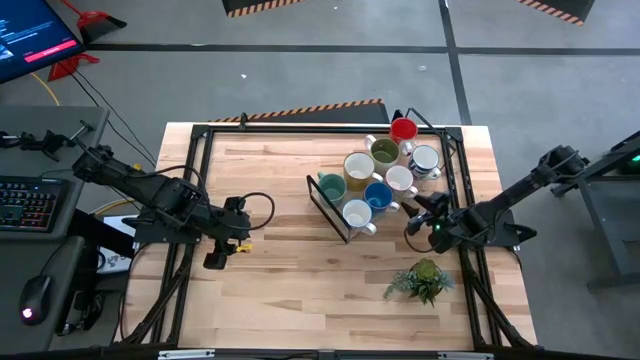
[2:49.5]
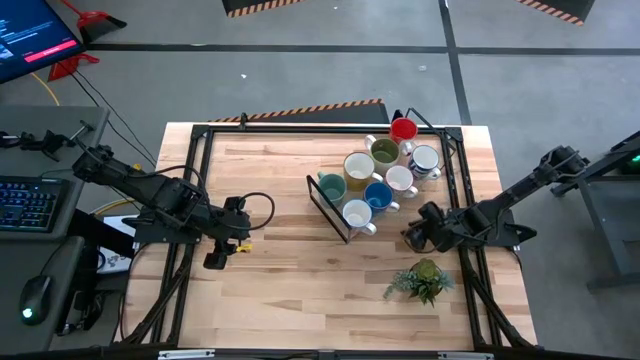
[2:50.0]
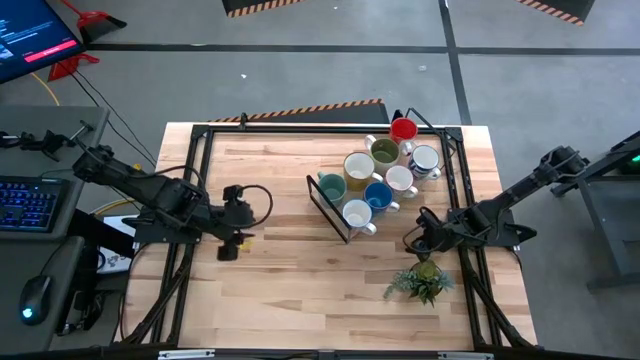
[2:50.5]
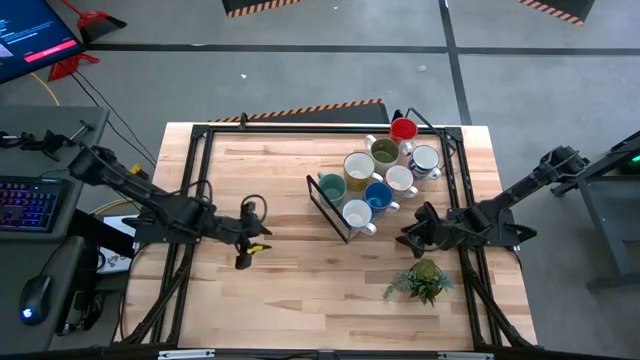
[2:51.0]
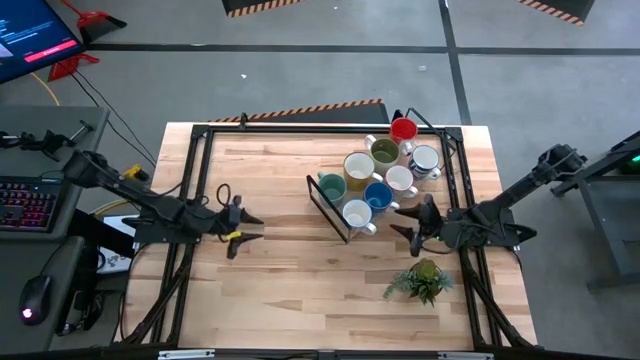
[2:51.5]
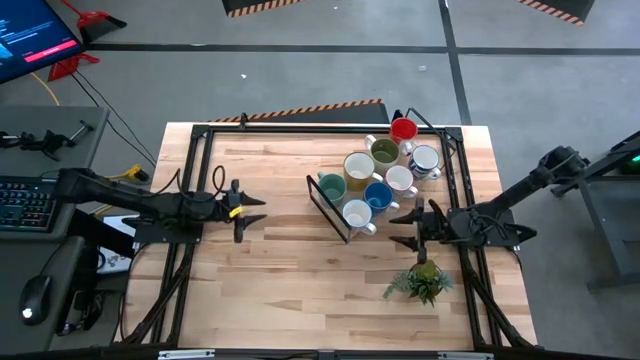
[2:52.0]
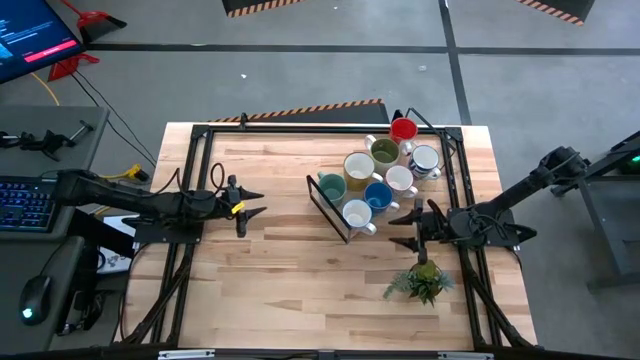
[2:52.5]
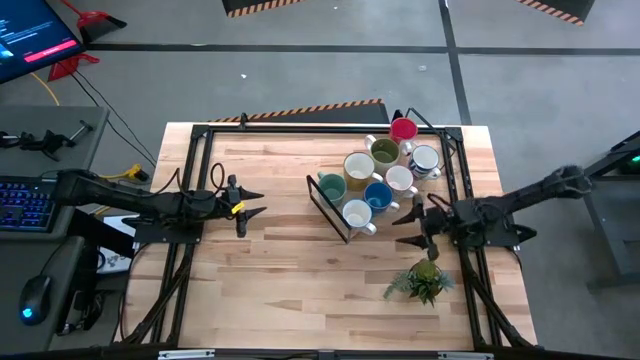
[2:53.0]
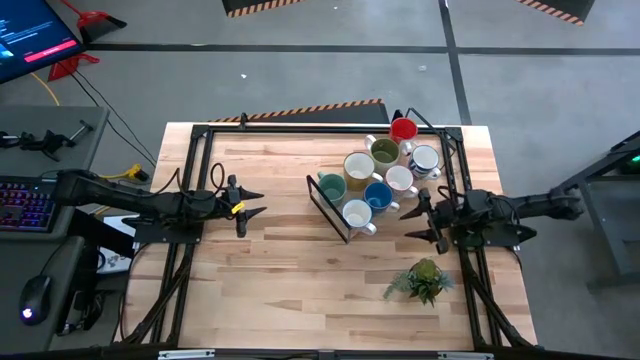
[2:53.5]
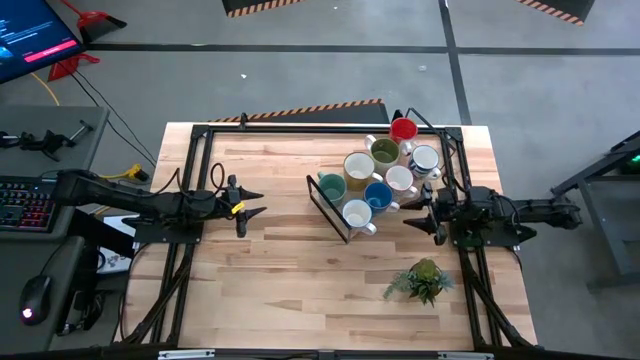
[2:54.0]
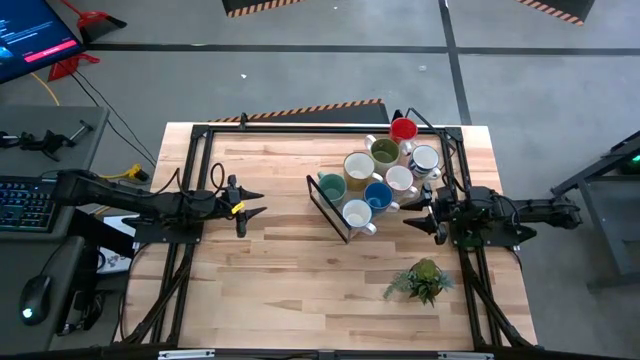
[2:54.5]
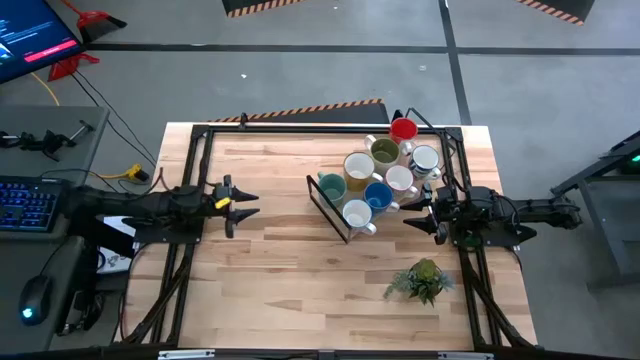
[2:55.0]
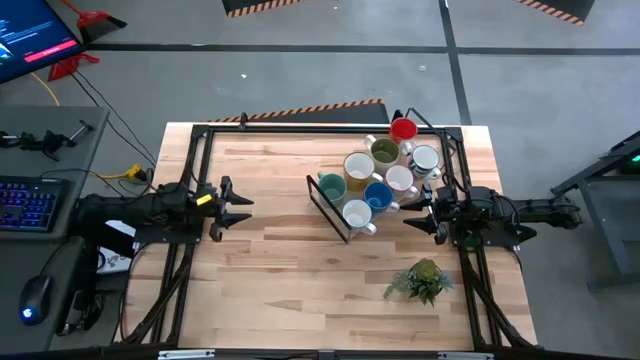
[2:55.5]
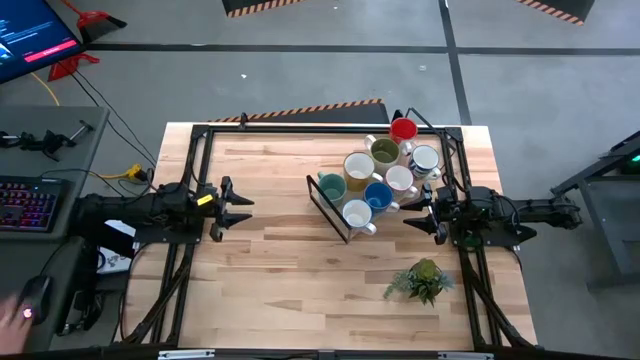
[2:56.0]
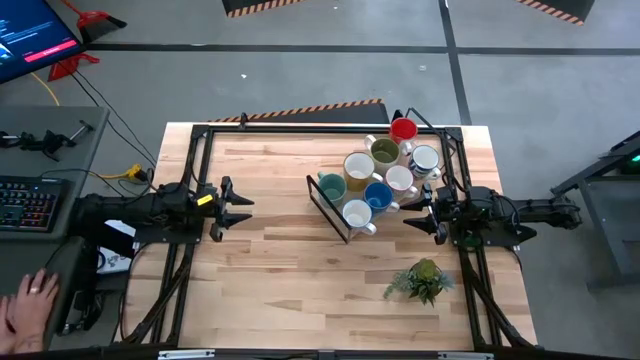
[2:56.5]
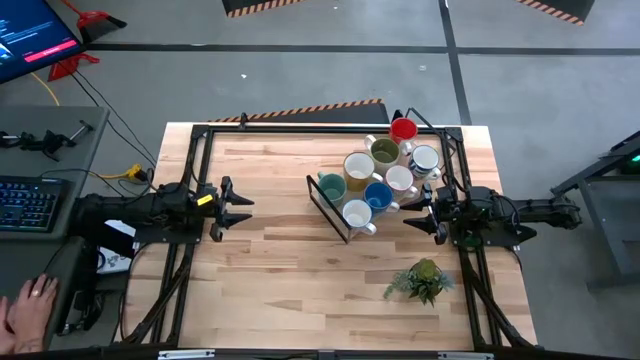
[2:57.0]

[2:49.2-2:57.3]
Task: Place coffee mugs
Return to Home Position

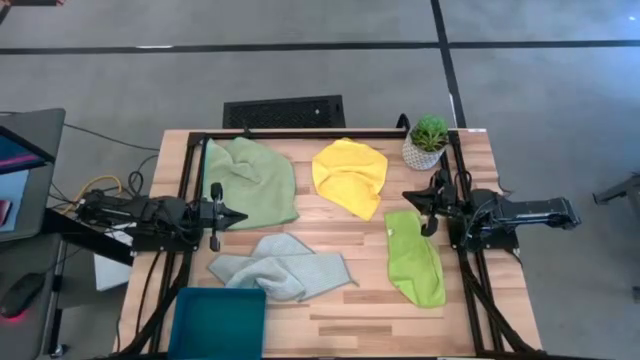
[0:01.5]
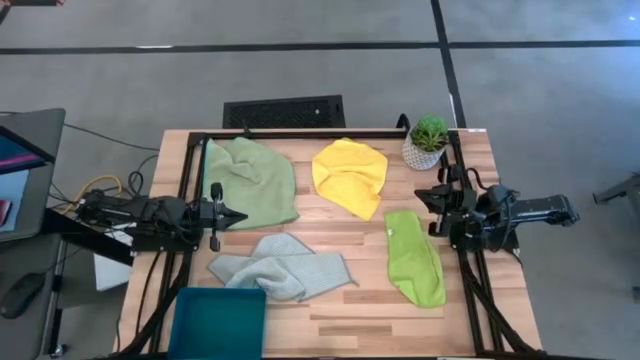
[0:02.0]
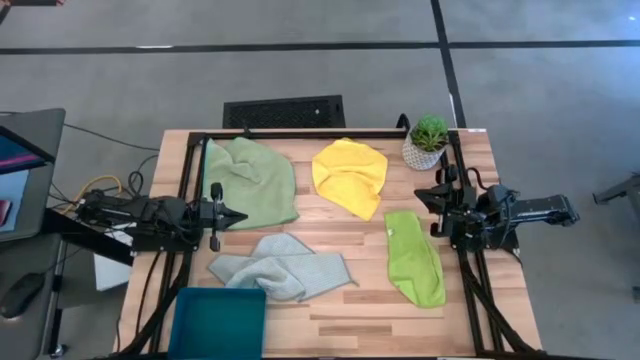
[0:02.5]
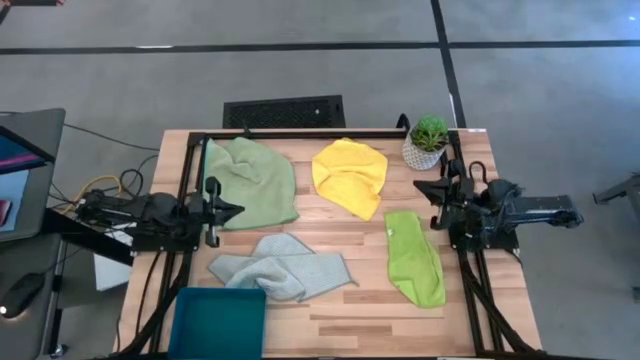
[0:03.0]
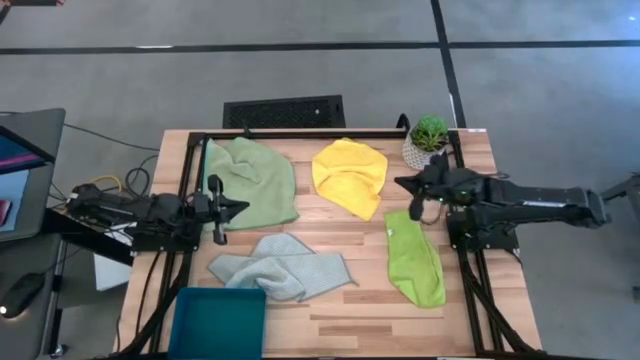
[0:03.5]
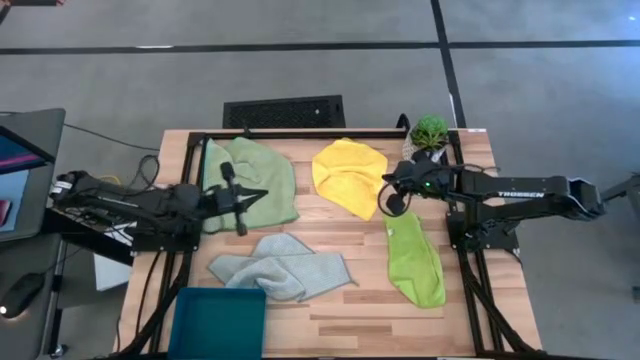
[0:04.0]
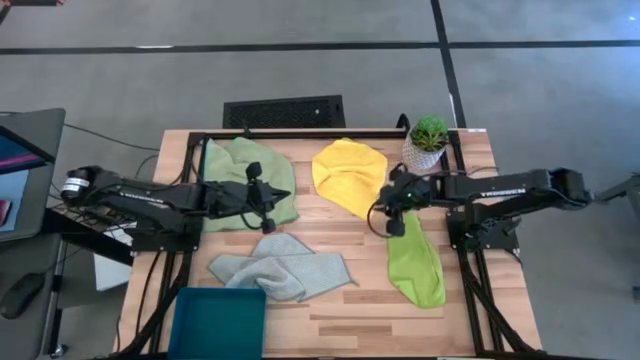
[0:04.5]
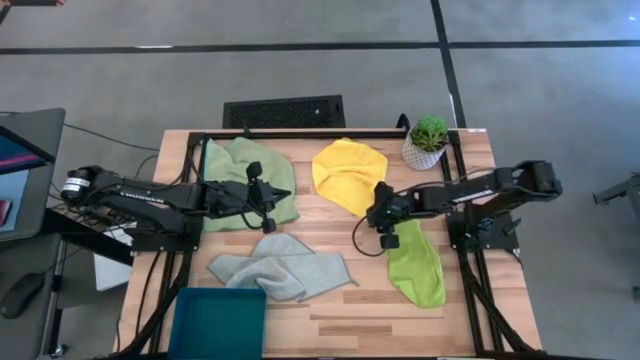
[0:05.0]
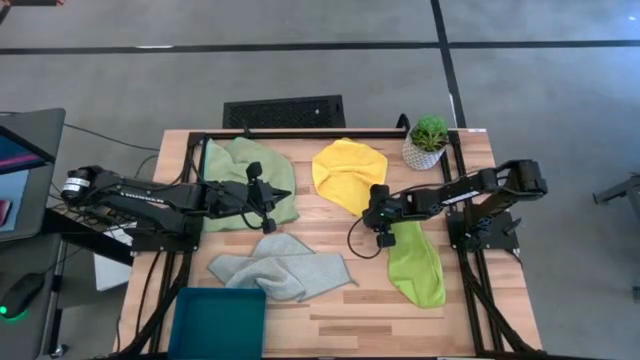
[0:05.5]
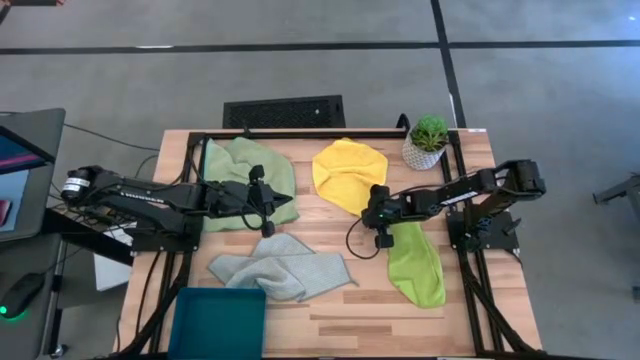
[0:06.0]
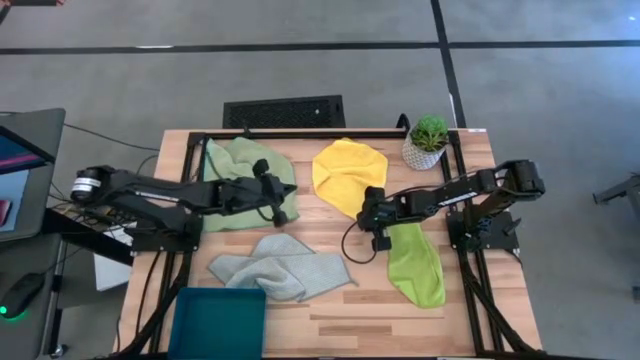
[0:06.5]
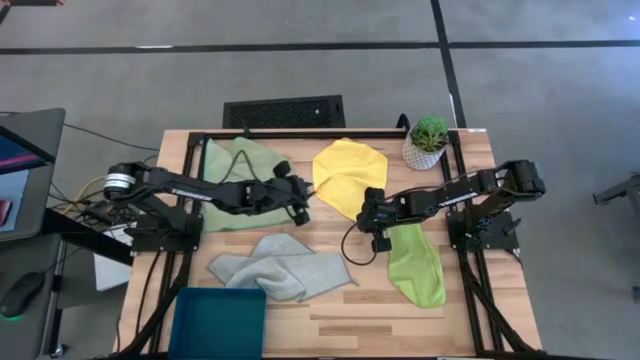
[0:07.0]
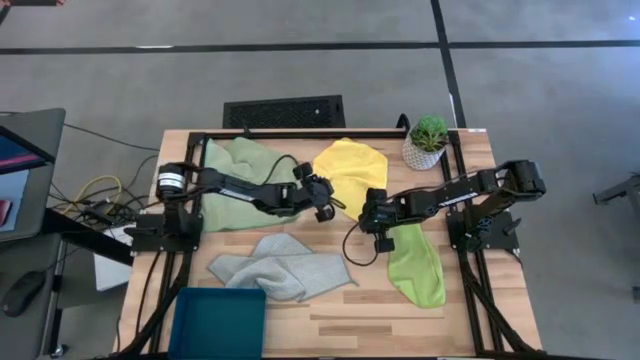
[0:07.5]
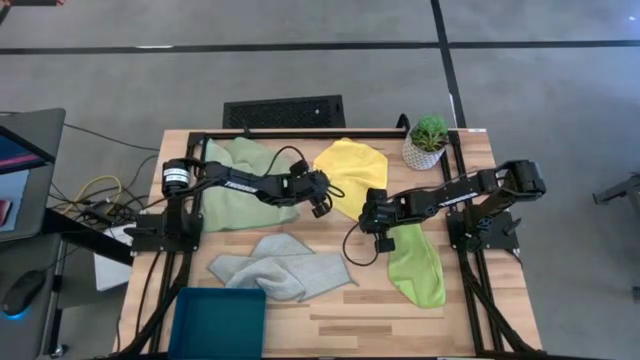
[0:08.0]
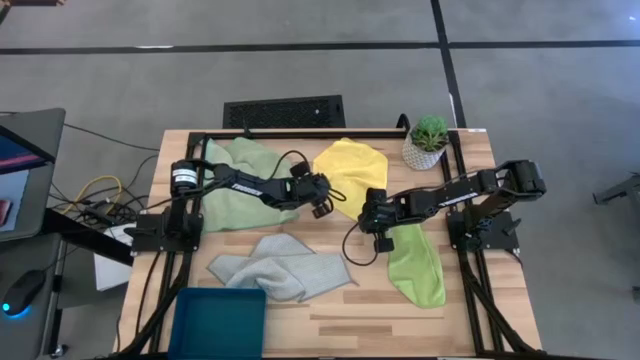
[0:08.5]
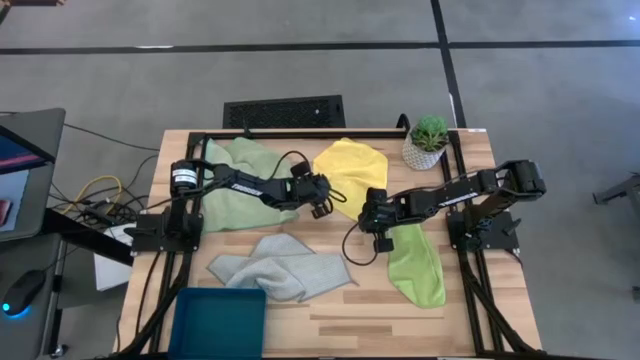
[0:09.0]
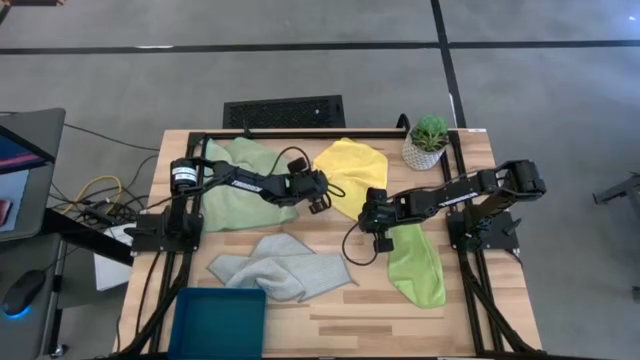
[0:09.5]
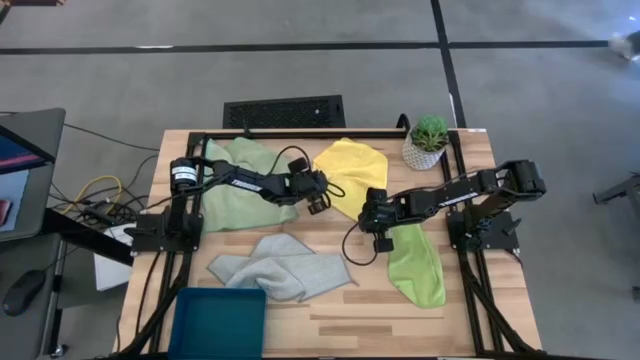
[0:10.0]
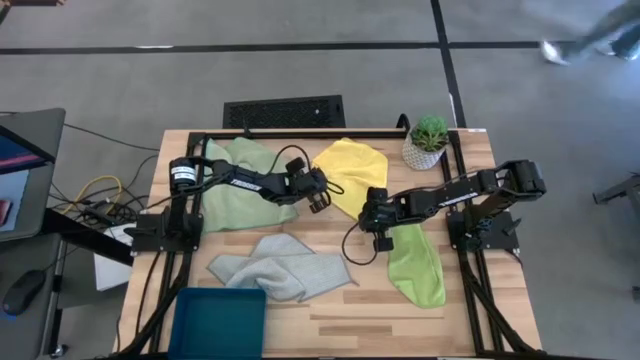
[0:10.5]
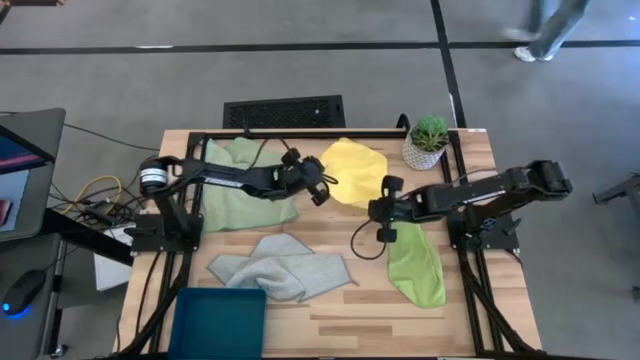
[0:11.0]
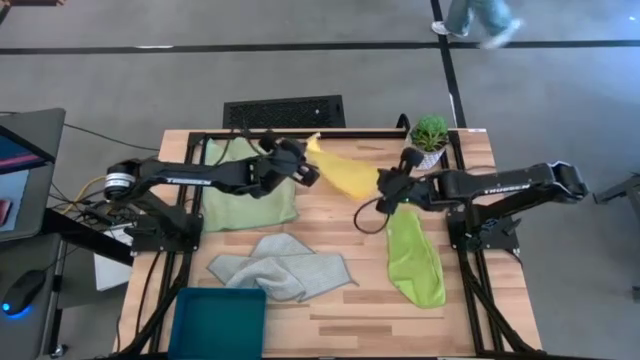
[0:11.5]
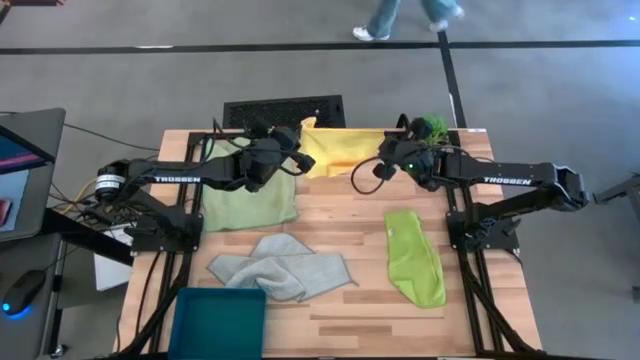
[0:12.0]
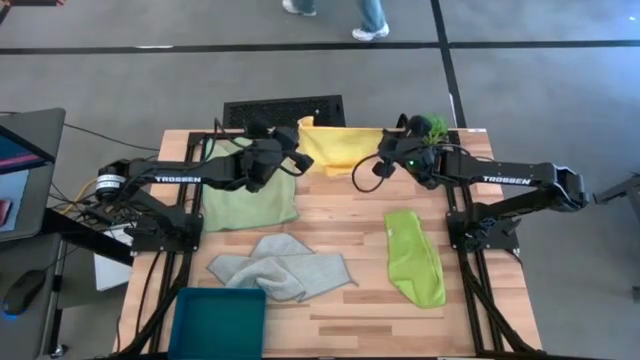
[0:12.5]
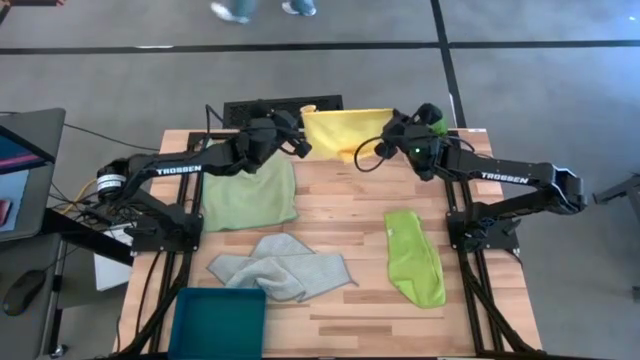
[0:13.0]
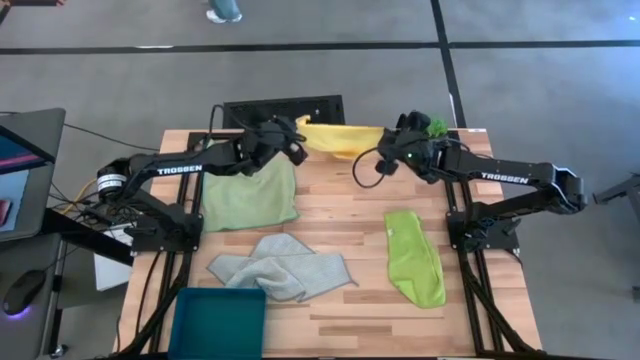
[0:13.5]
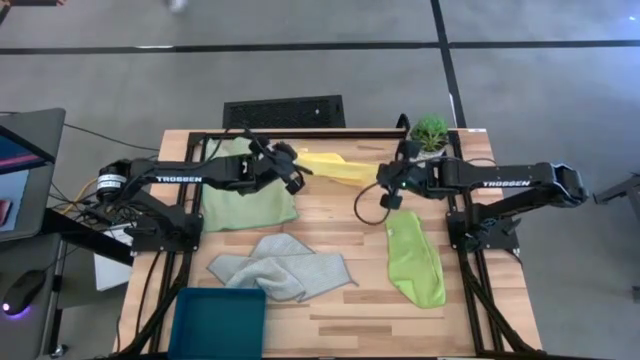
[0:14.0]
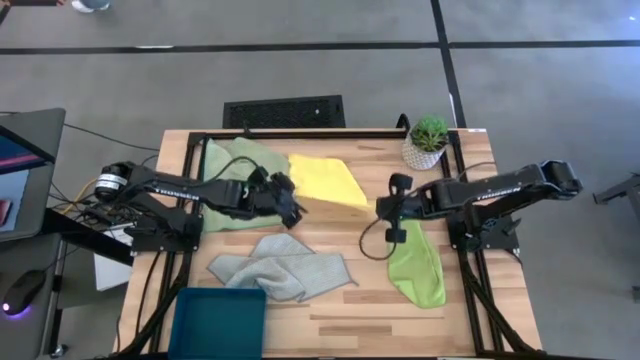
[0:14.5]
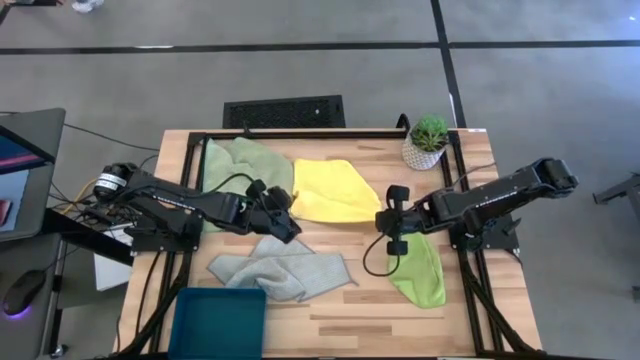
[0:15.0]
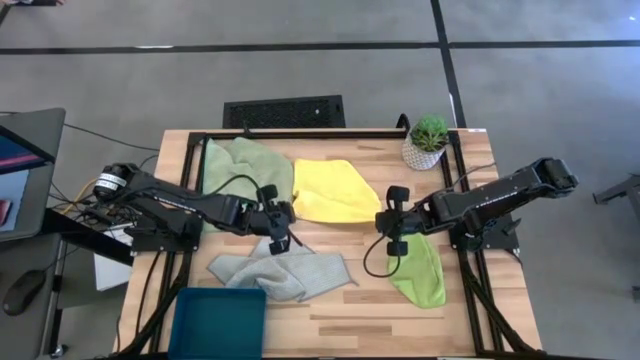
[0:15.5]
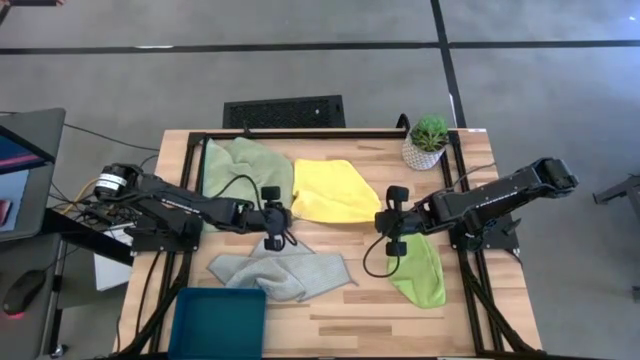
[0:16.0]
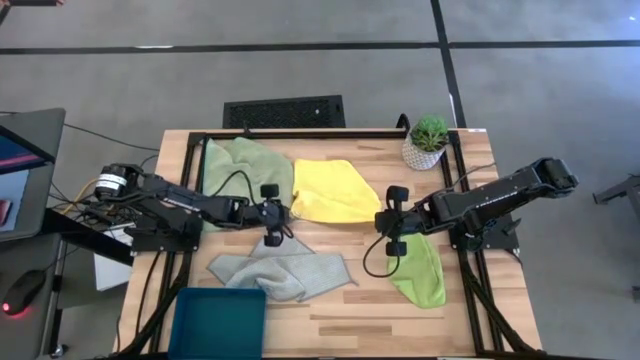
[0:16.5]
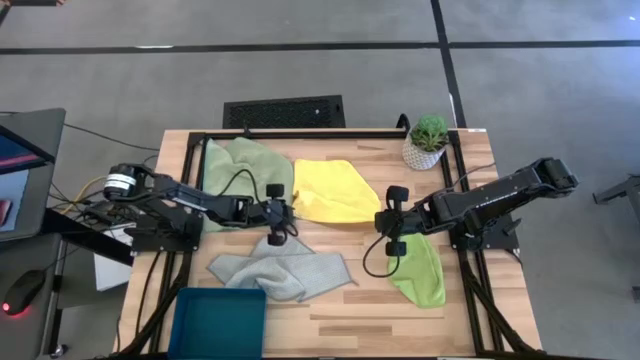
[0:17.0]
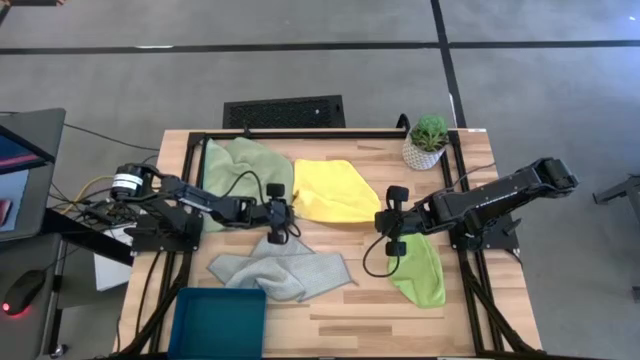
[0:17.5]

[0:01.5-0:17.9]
Task: Fold microfiber towels
Fold the yellow microfiber cloth
